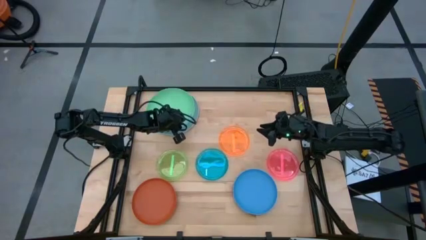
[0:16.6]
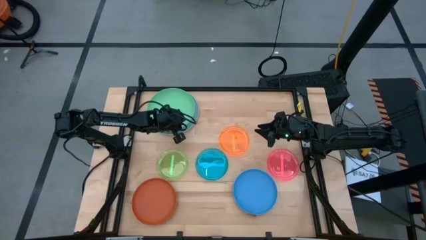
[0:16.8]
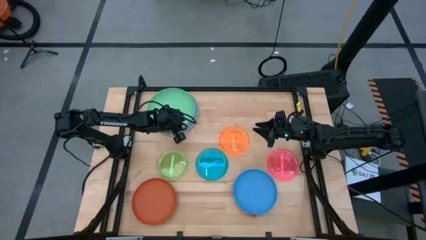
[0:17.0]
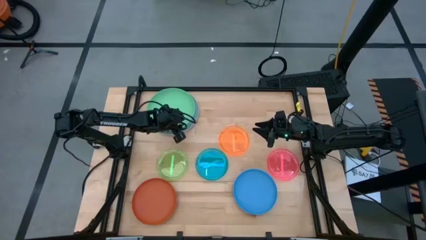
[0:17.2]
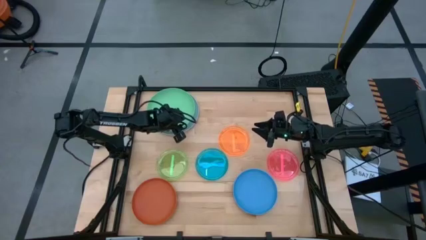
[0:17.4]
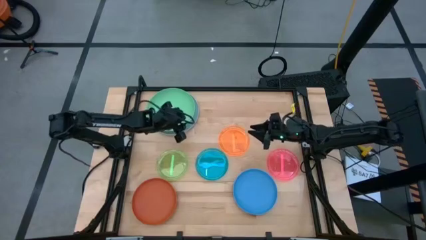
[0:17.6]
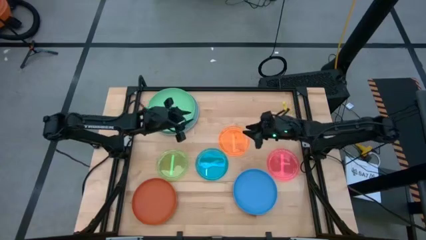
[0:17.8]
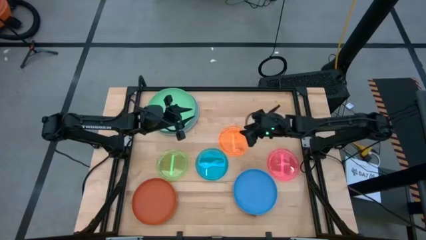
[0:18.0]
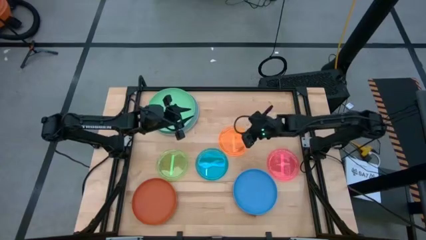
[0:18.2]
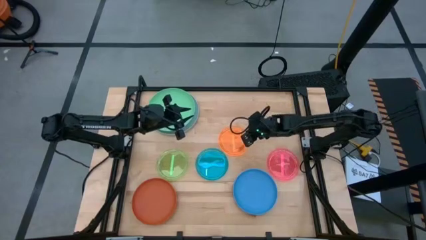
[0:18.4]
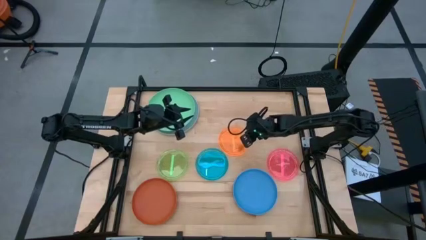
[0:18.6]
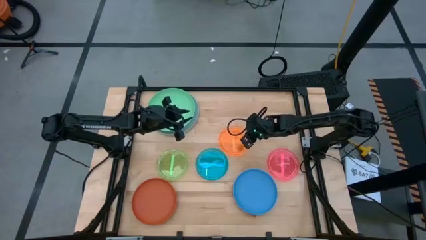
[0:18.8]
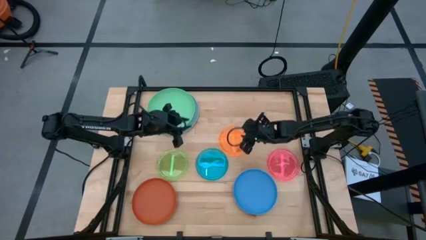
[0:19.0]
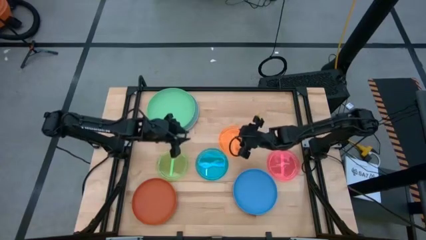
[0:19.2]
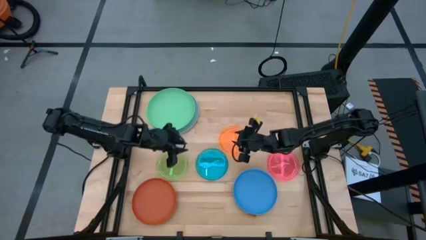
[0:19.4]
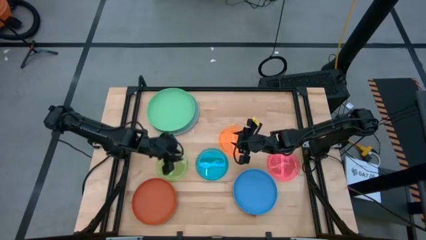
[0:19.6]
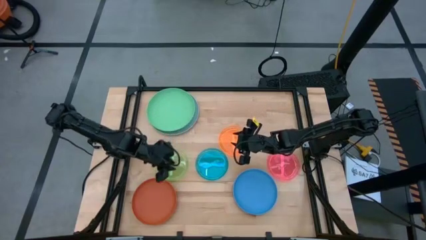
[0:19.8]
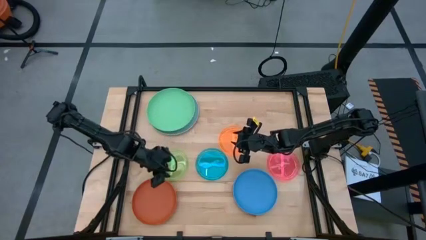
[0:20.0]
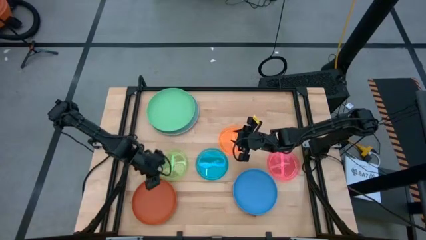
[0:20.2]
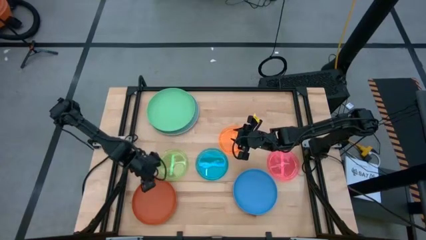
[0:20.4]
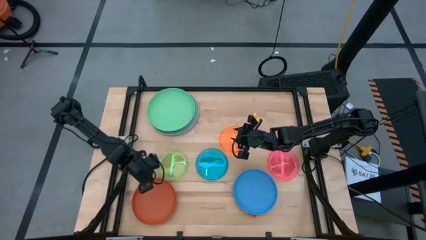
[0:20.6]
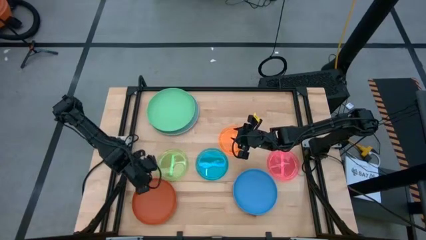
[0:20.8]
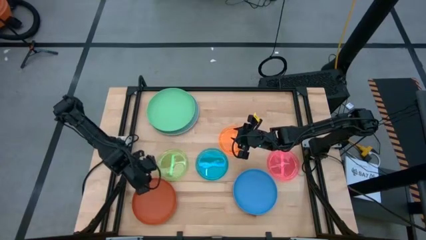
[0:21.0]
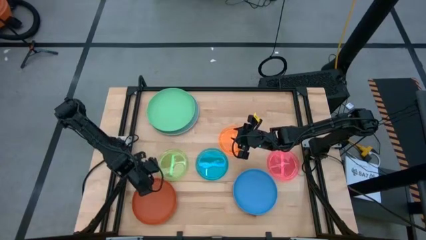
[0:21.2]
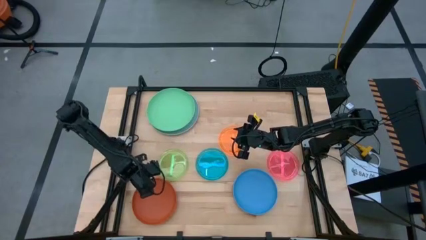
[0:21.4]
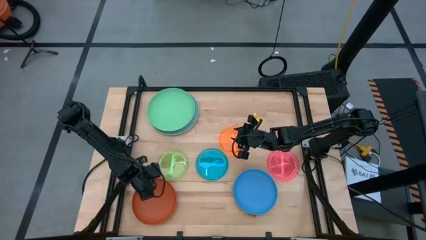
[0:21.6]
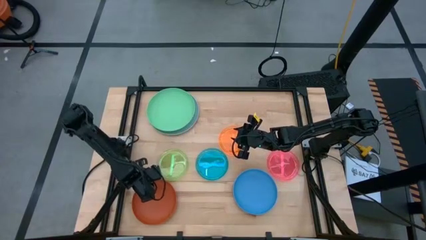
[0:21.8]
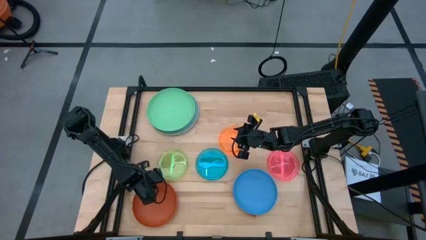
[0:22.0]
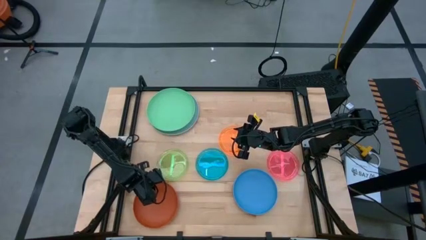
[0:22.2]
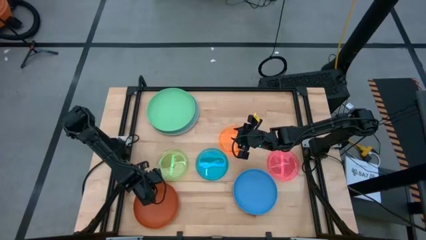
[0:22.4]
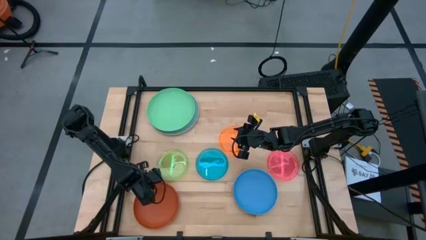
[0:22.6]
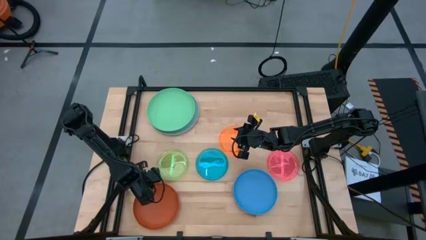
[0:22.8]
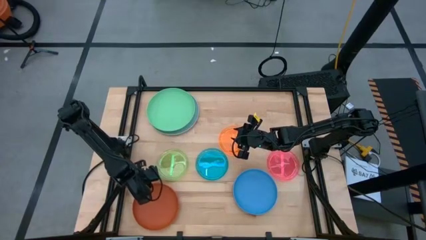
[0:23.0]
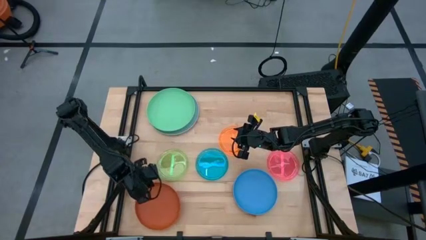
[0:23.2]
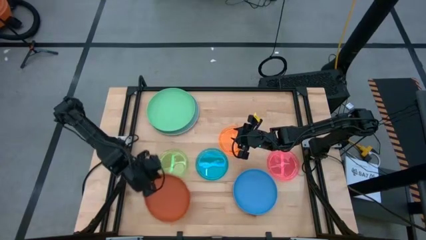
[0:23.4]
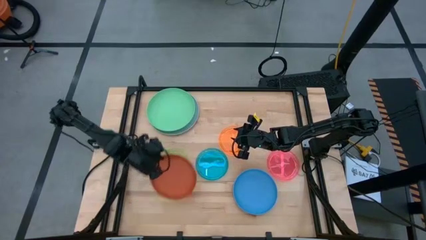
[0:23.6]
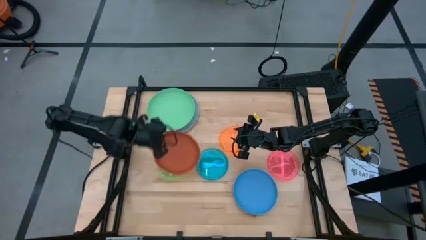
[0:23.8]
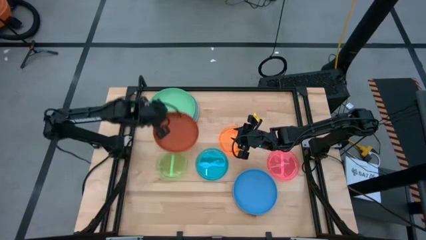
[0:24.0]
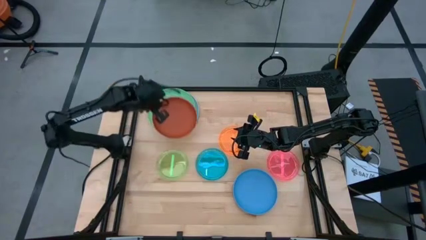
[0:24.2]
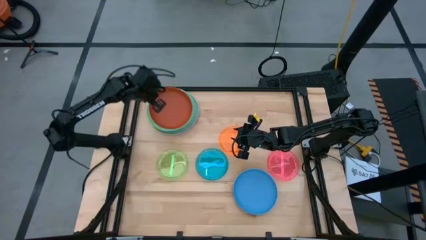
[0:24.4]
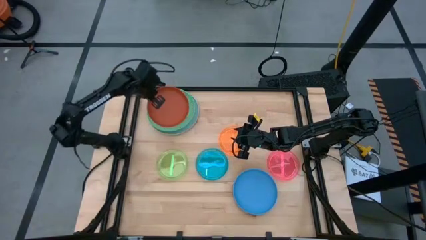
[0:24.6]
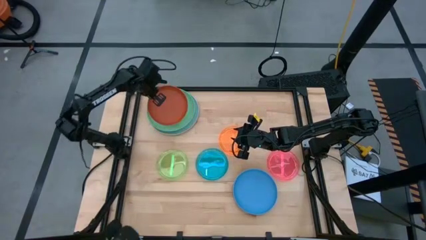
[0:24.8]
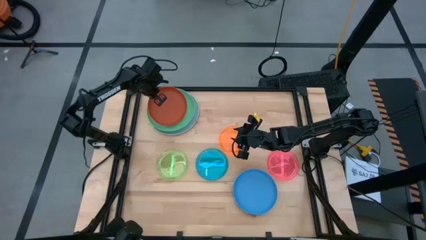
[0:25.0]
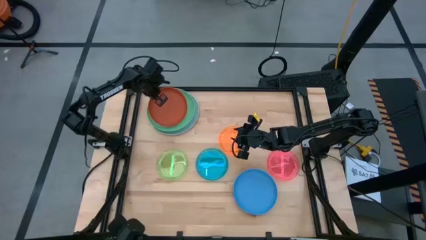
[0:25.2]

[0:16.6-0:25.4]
Task: Stack plastic plates
Stack the orange plate on top of the green plate
